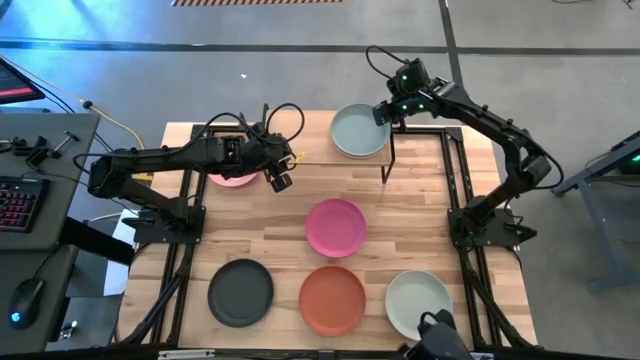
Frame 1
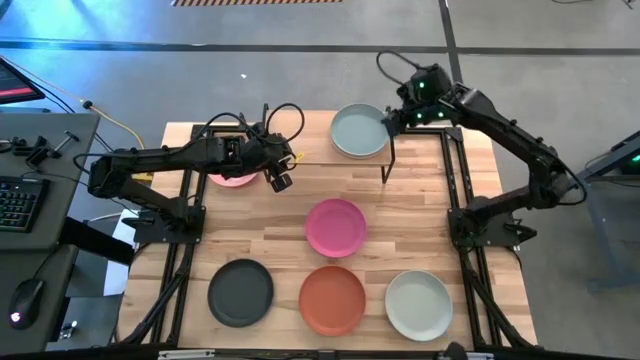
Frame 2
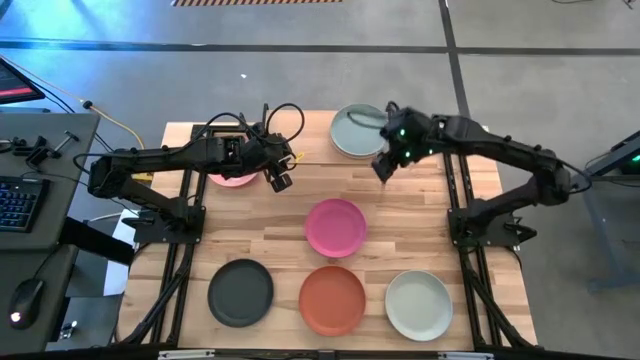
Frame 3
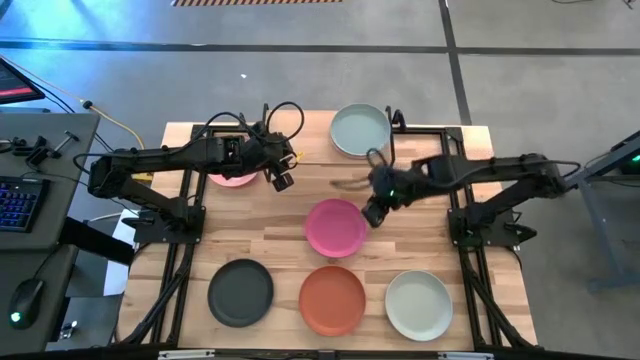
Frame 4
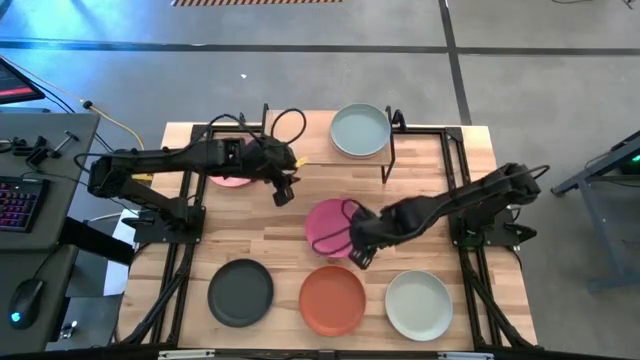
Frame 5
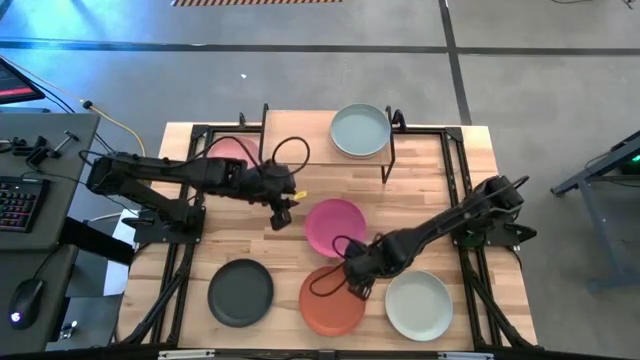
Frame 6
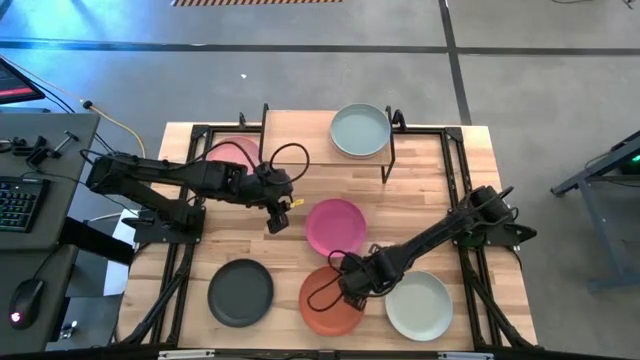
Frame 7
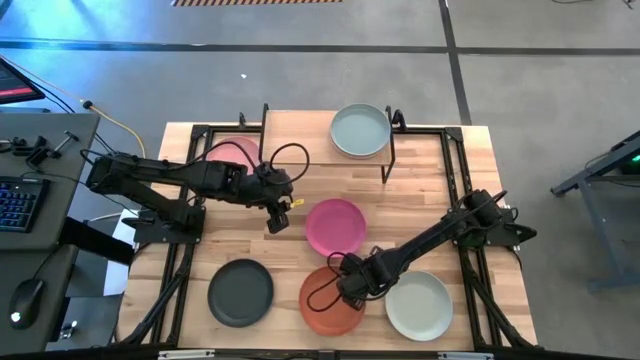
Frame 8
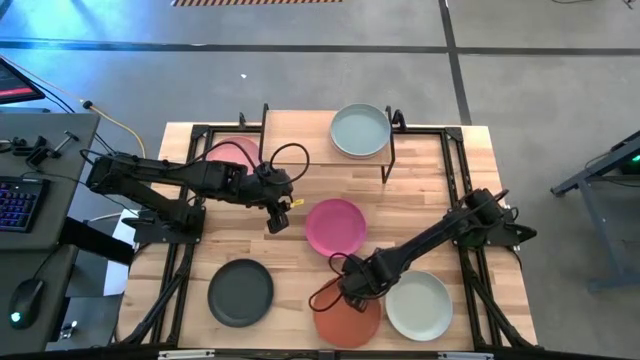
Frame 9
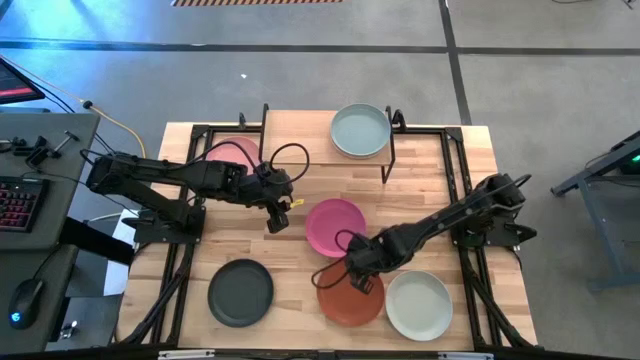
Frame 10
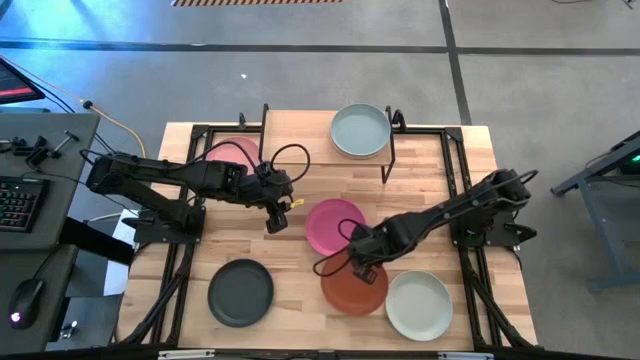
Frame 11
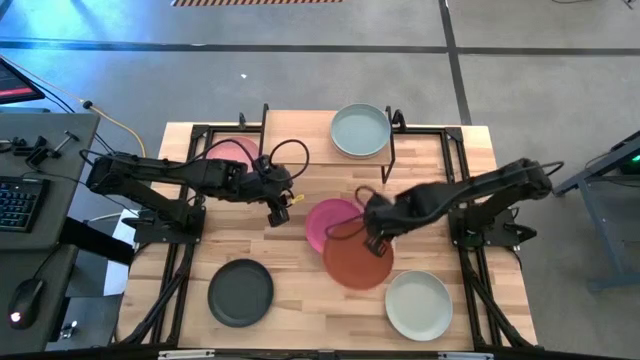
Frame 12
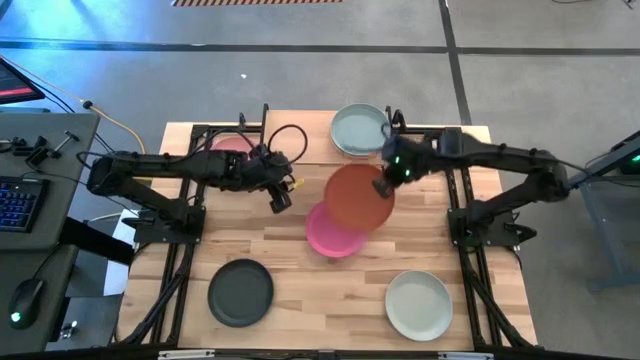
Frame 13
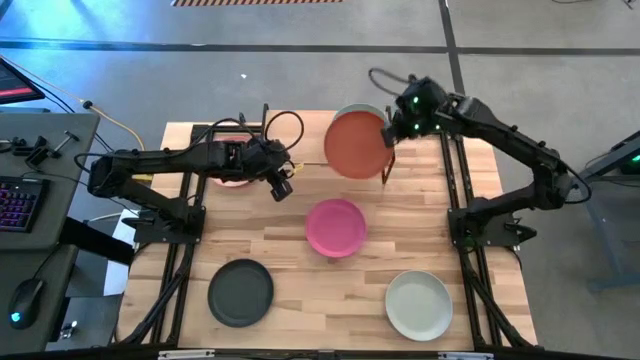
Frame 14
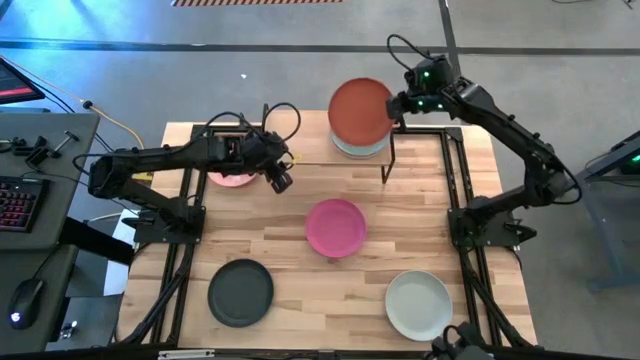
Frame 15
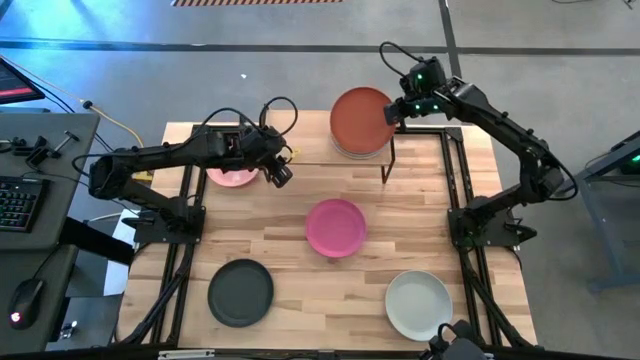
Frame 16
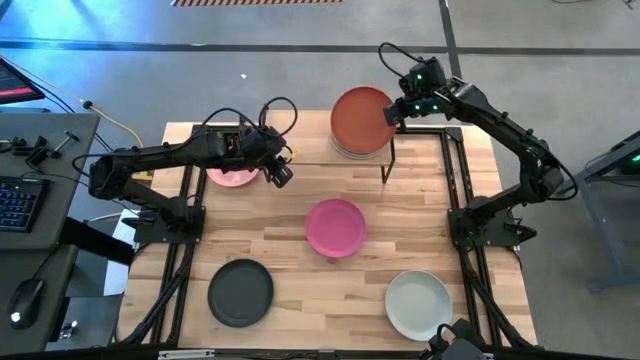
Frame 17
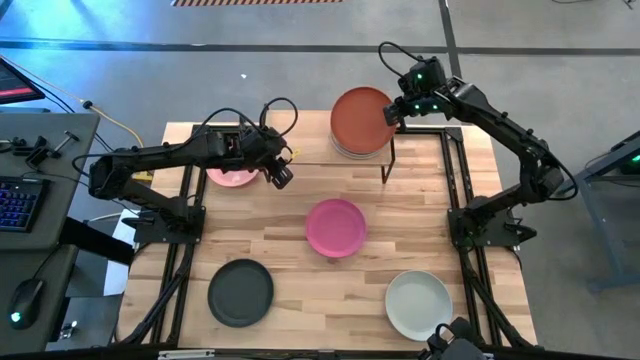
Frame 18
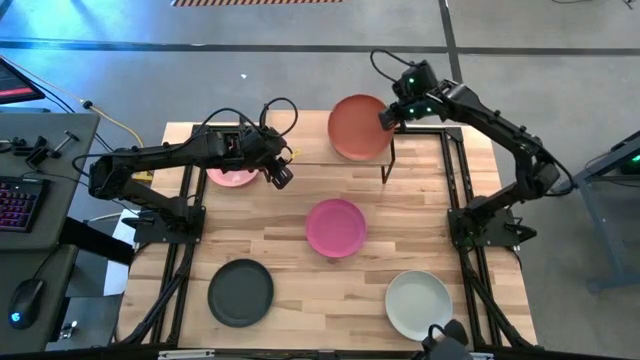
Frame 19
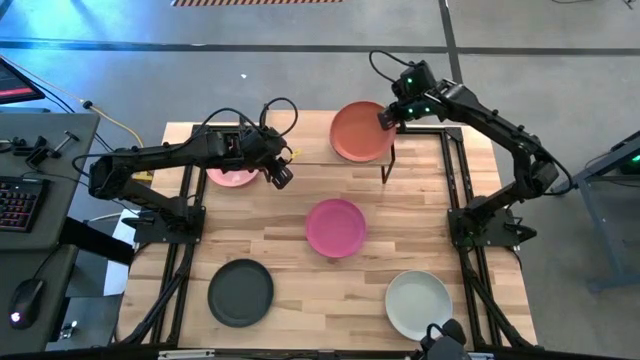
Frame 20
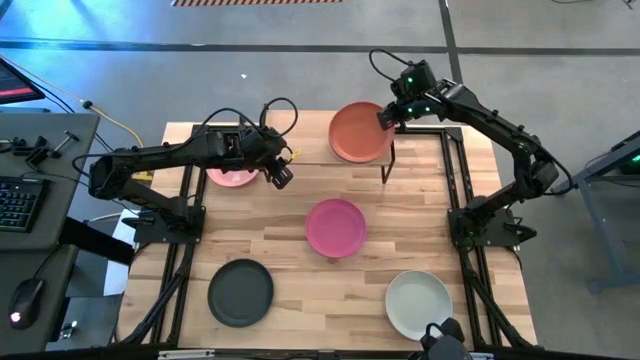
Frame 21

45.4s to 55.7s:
Task: Place and stack plates onto a shelf
Stack the orange plate on top of the gray plate on the shelf

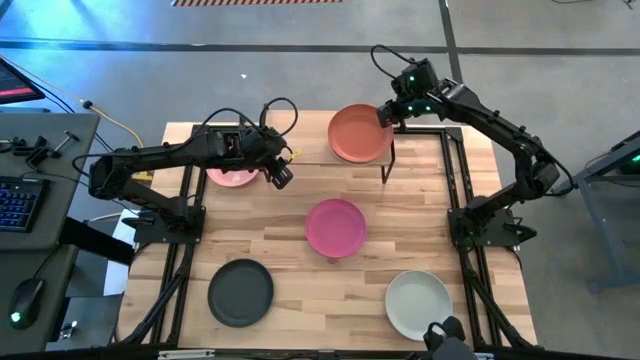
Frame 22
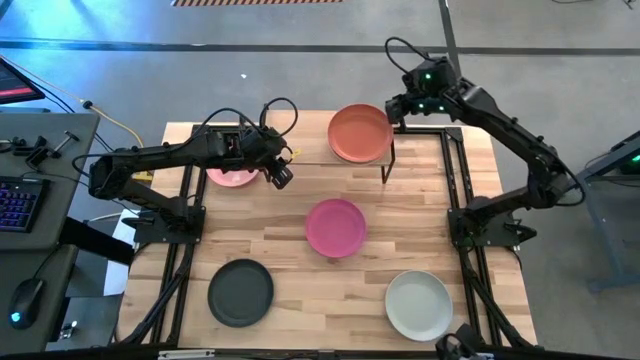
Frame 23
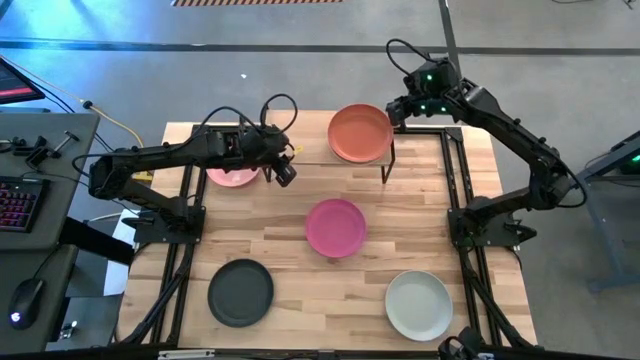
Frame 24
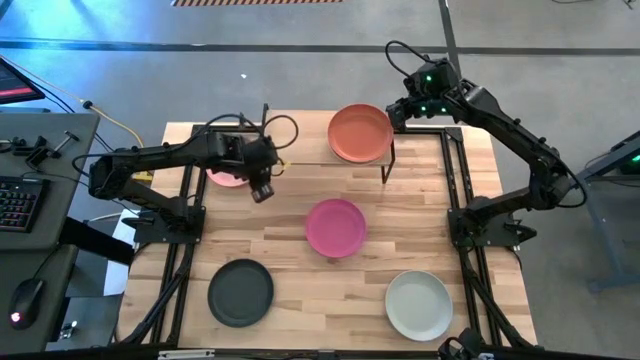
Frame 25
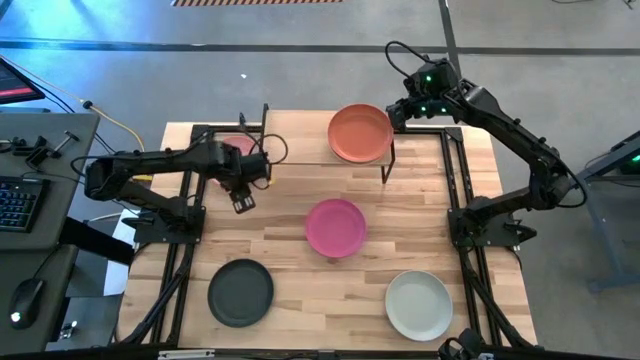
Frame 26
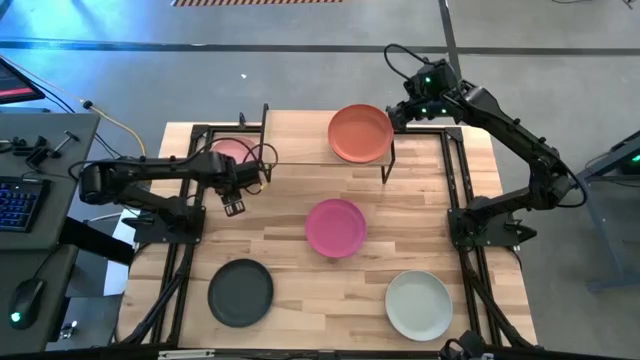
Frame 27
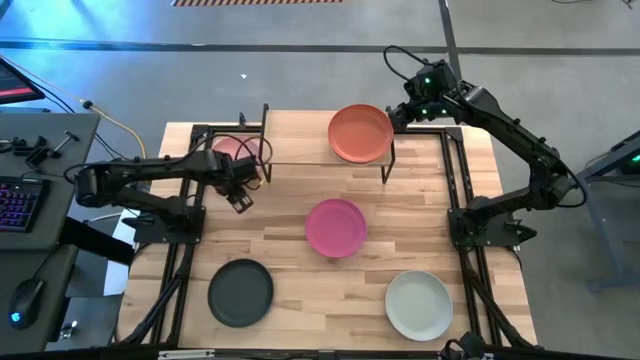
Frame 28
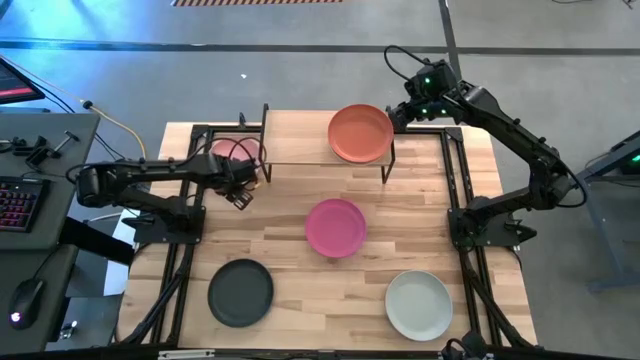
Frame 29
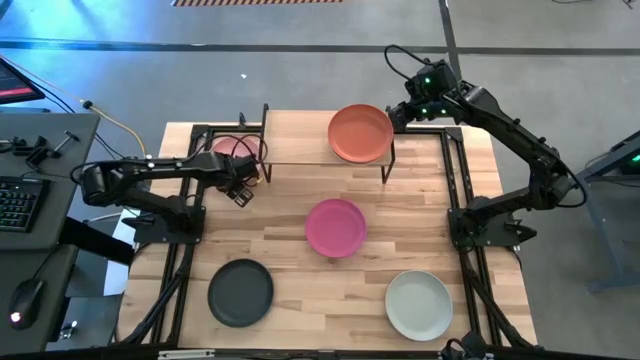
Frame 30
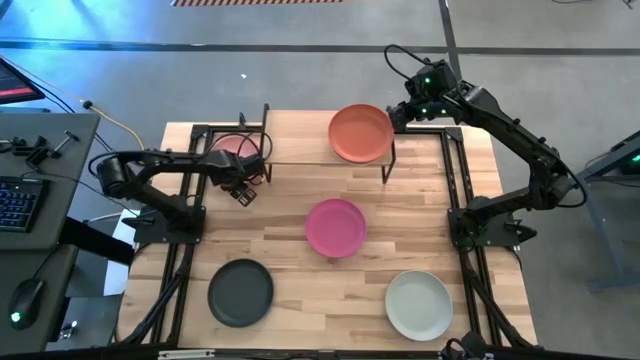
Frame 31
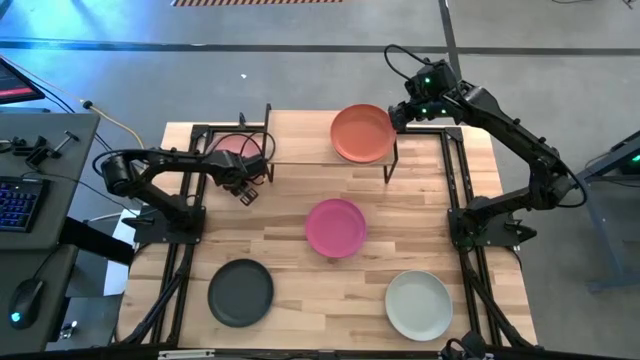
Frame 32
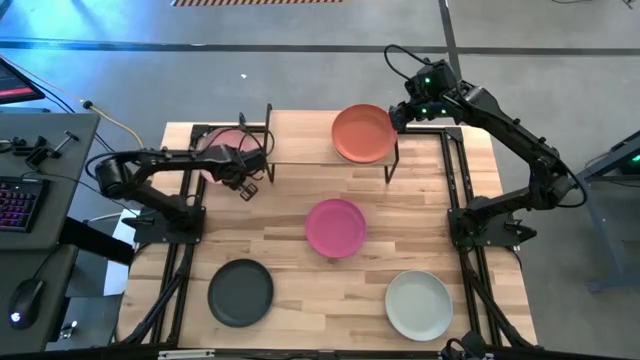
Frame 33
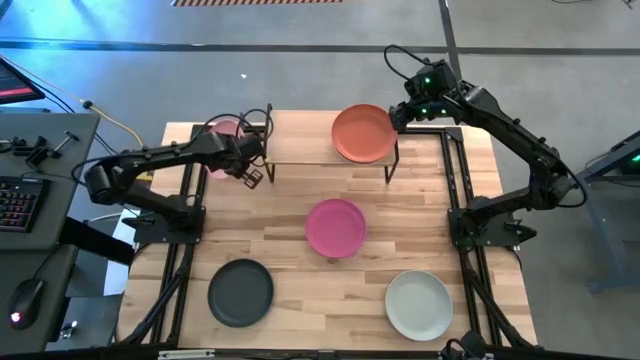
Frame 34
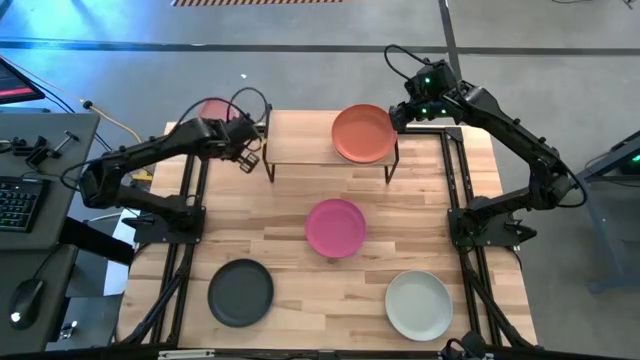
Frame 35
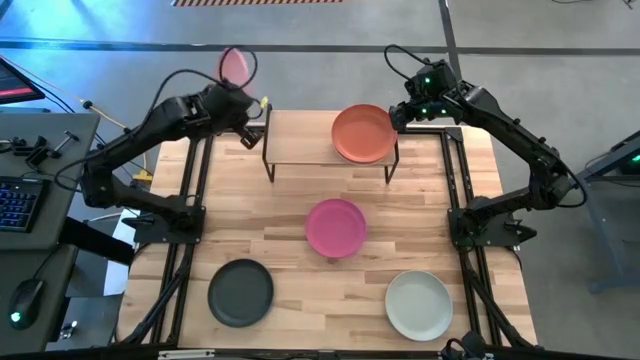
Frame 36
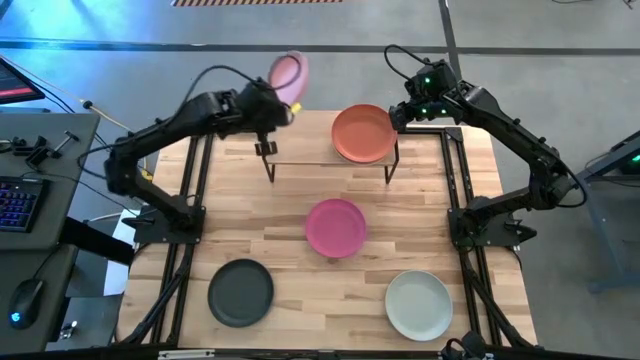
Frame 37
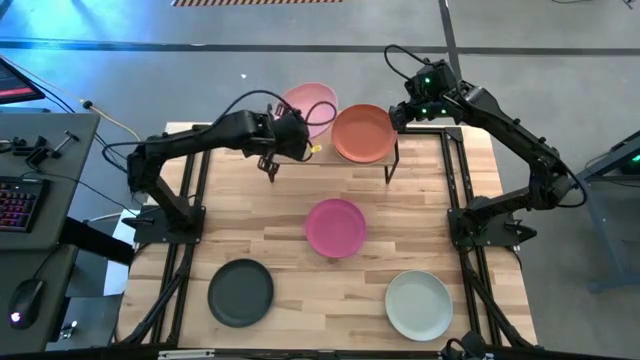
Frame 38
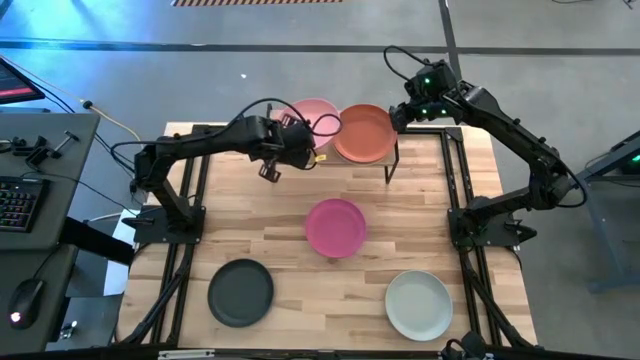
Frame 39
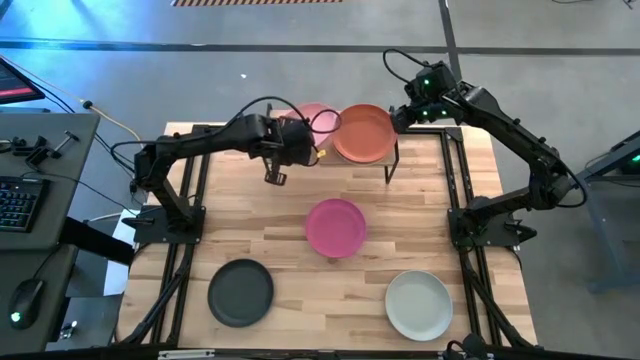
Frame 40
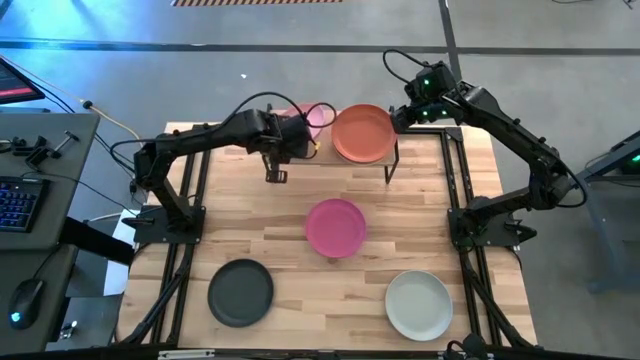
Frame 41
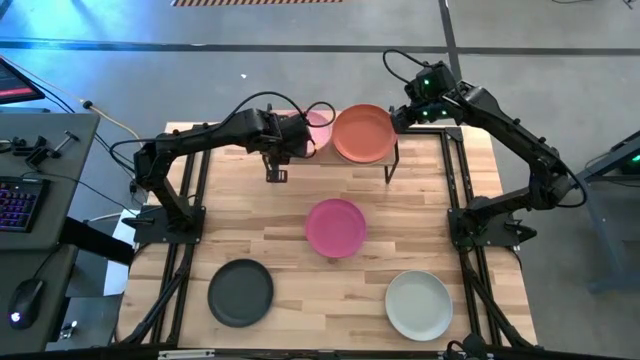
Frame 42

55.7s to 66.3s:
Put the light pink plate on the shelf

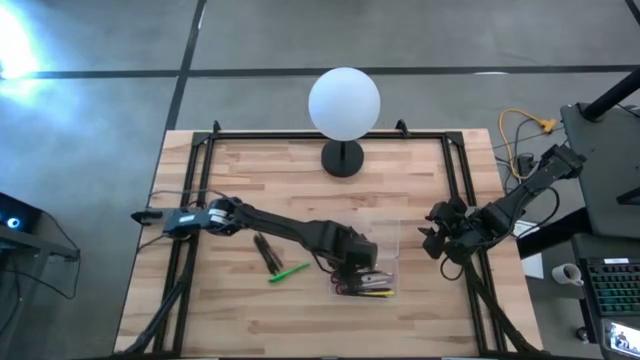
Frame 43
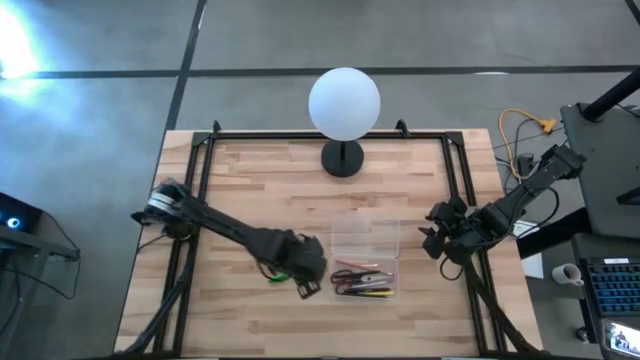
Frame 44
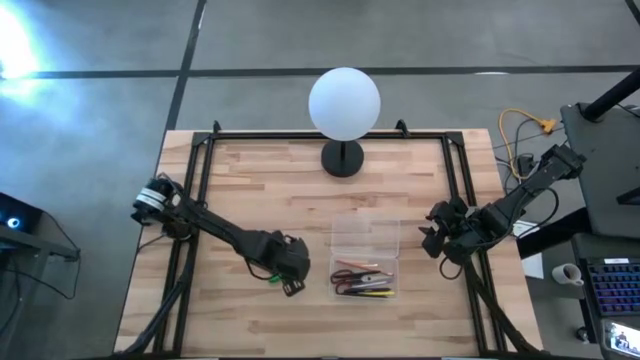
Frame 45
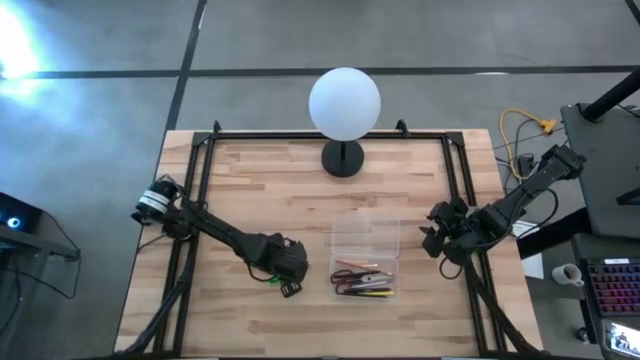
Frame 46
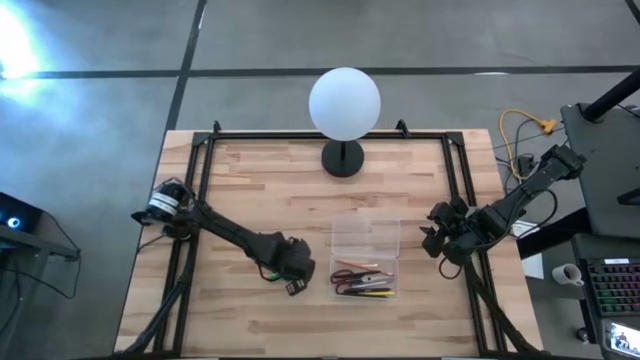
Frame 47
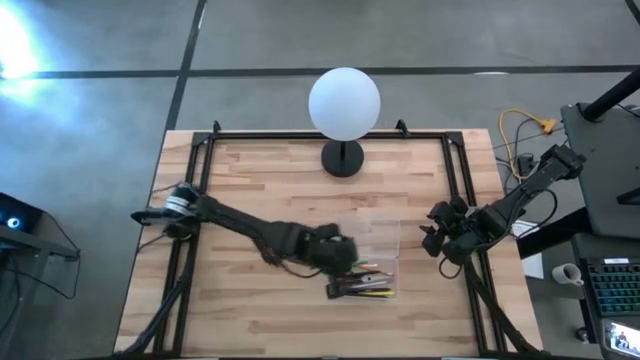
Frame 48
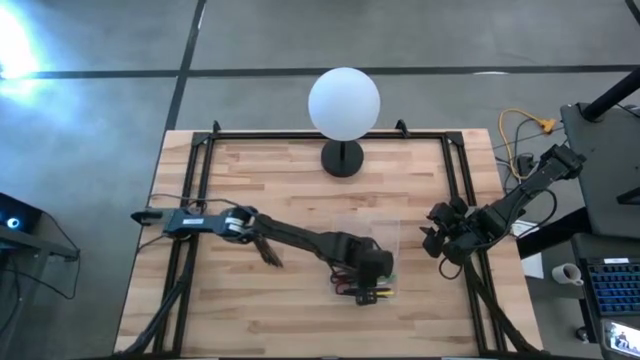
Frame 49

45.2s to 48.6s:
Task: Pick & place school supplies into a supply box
Put the green pen into the transparent supply box
